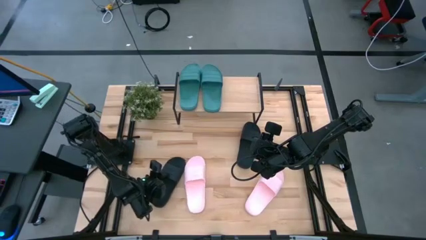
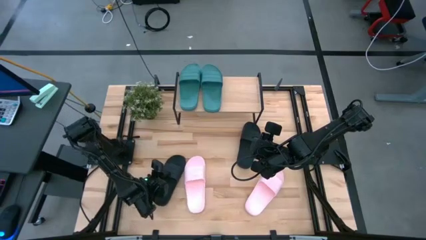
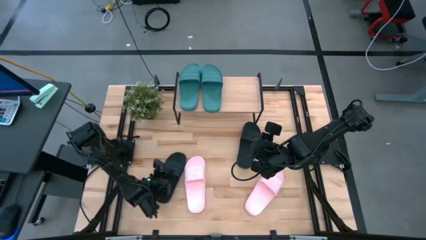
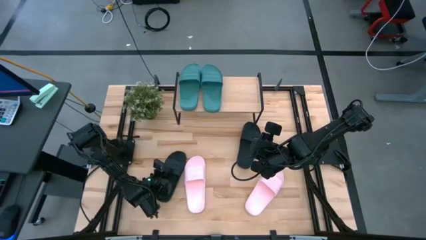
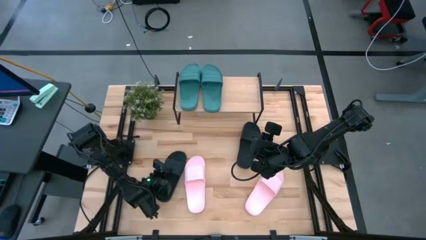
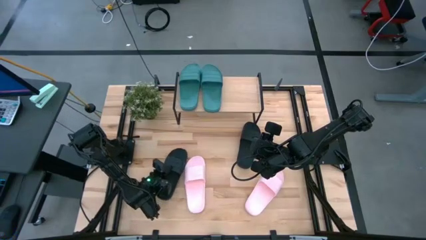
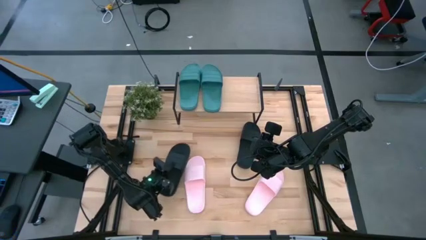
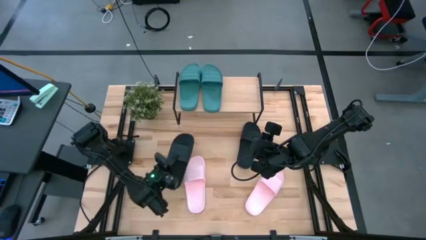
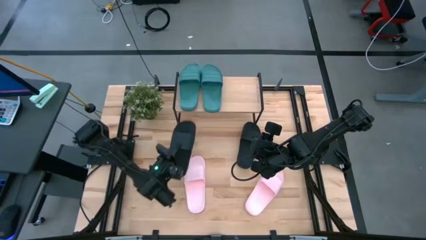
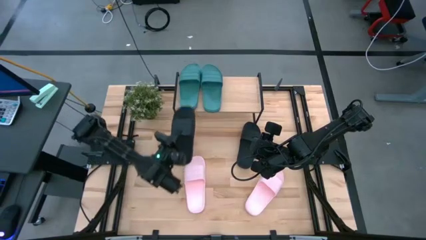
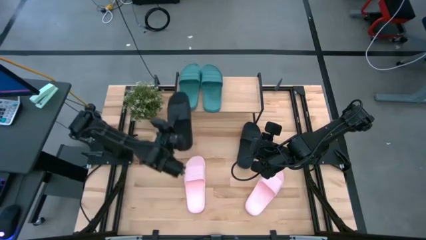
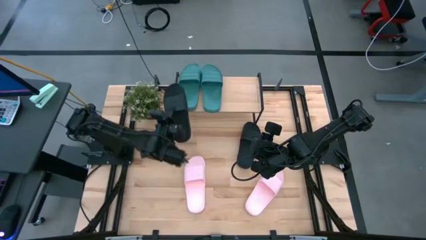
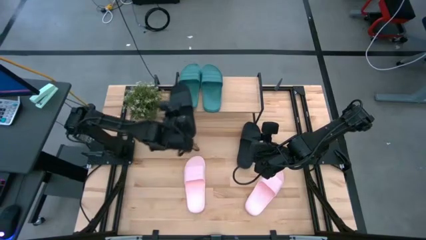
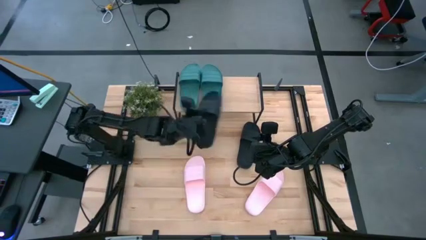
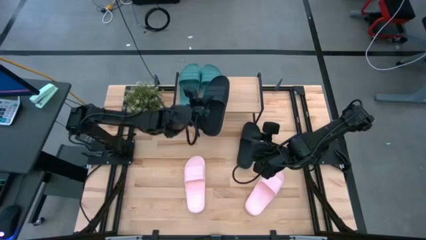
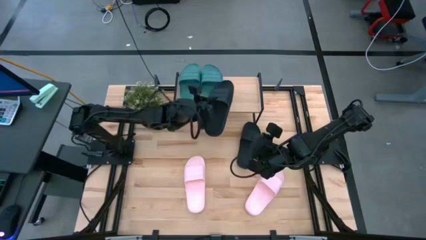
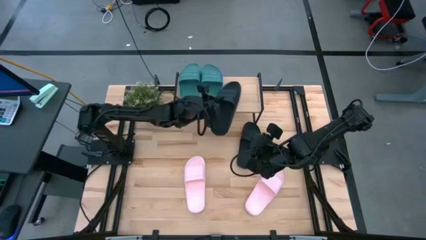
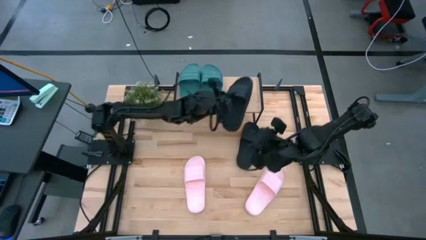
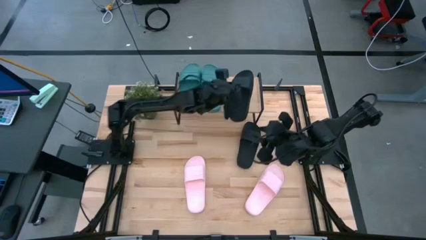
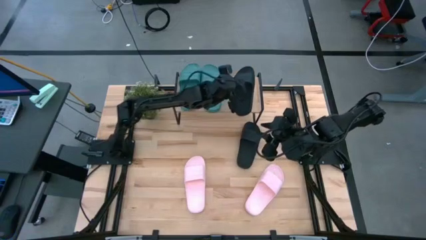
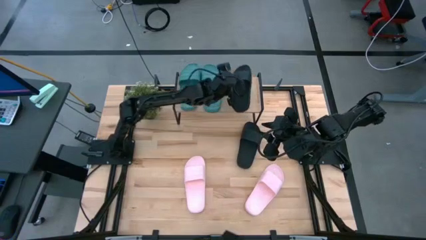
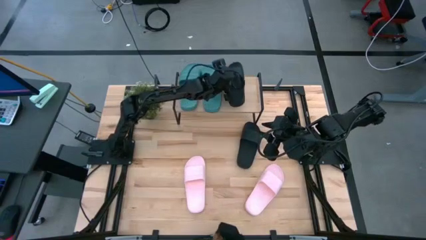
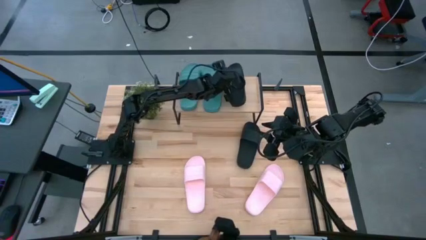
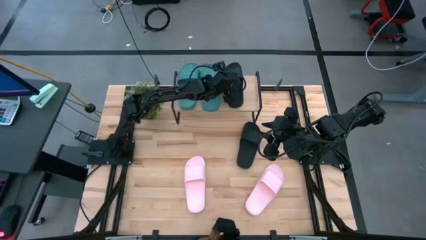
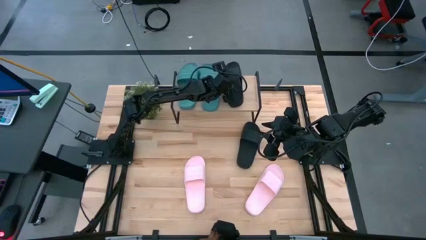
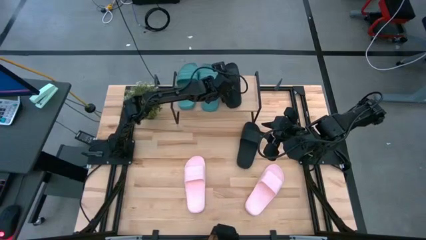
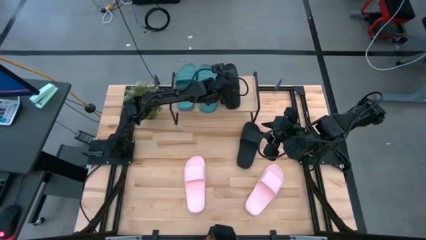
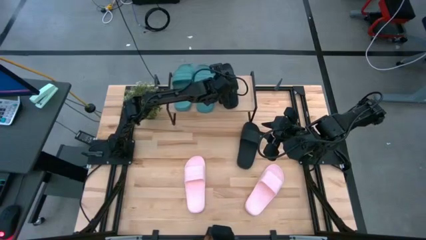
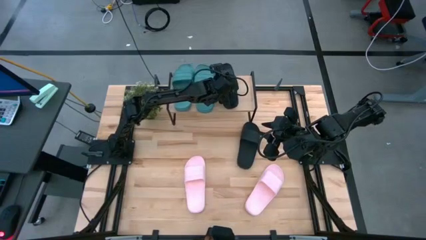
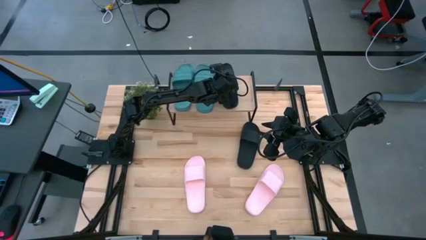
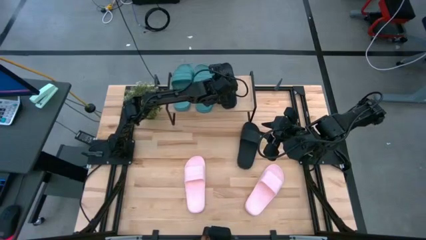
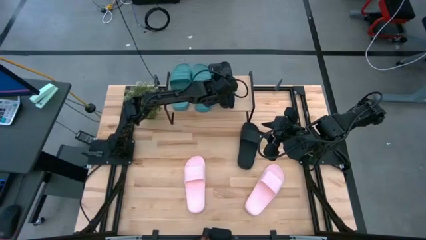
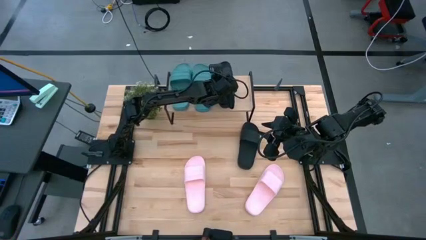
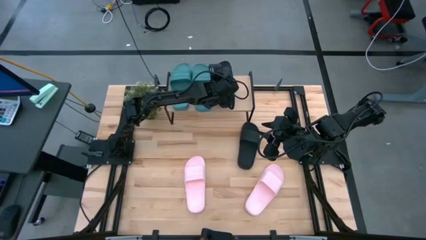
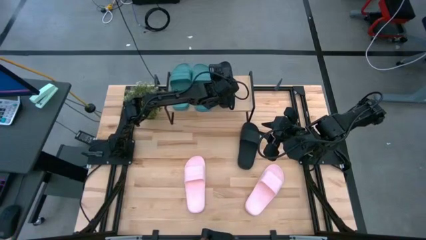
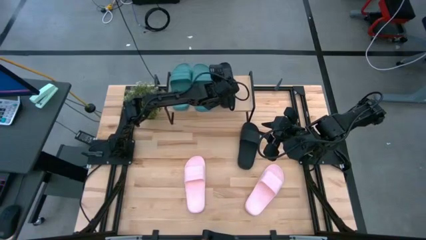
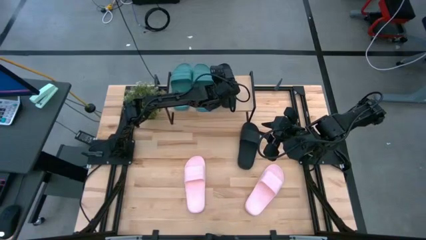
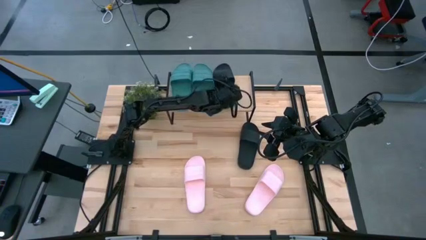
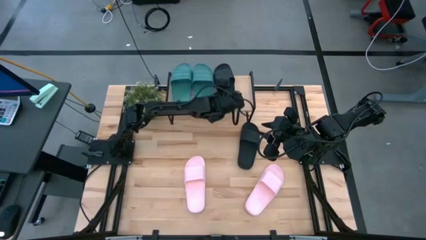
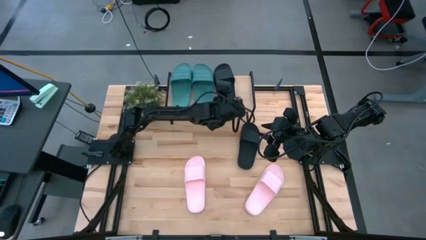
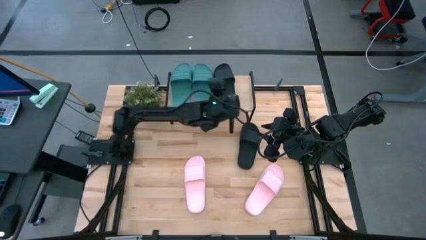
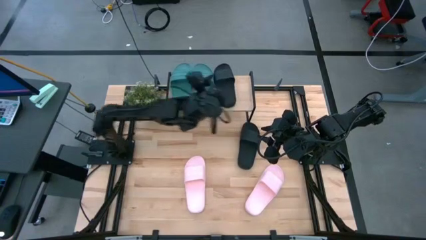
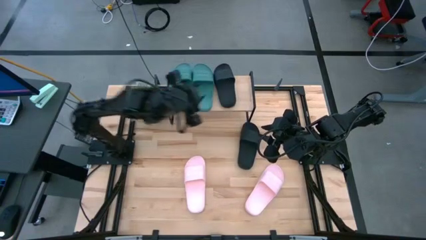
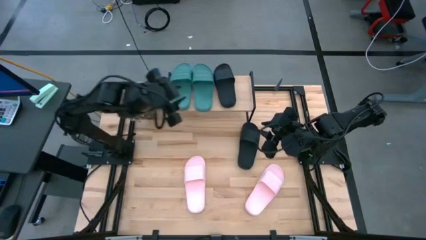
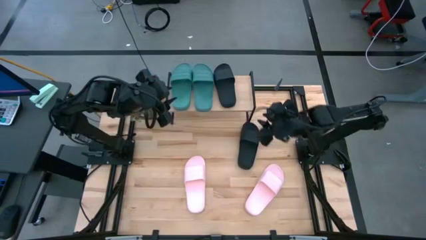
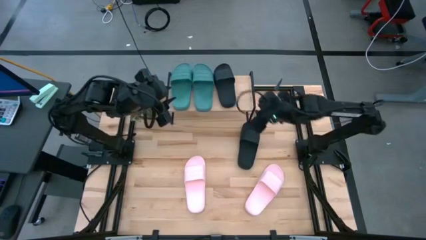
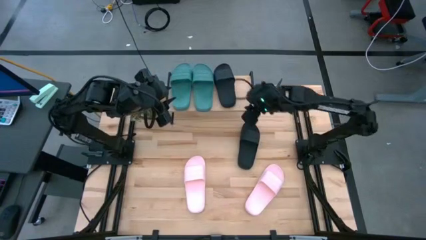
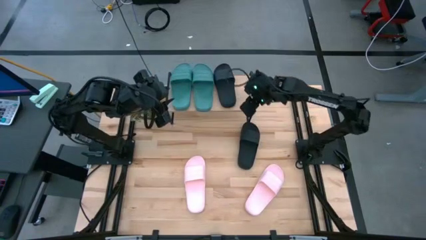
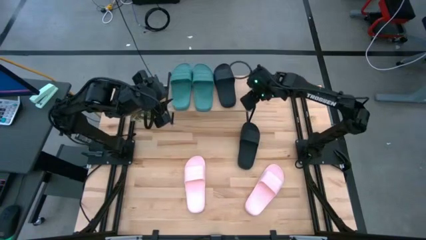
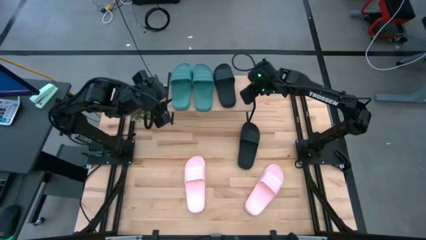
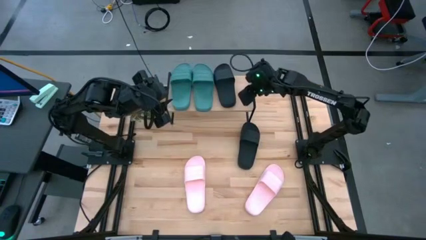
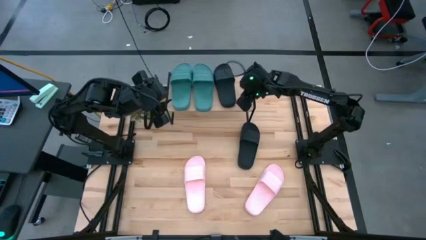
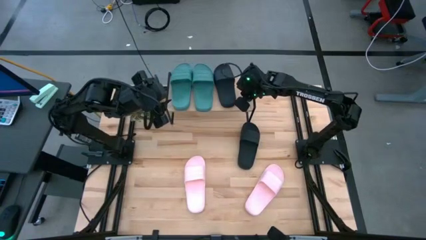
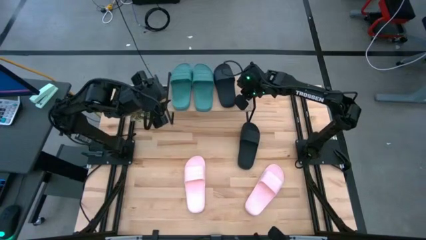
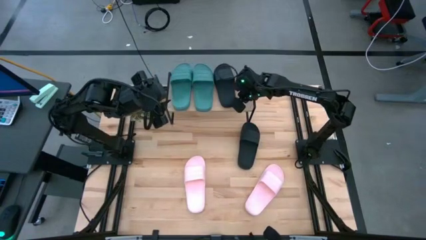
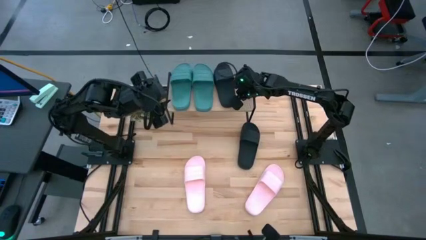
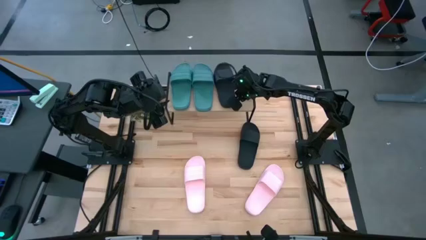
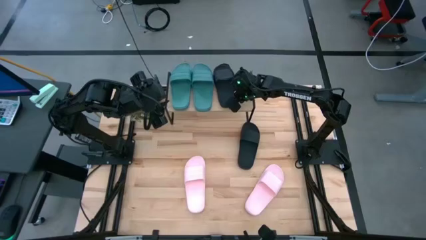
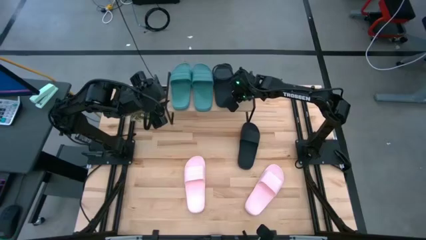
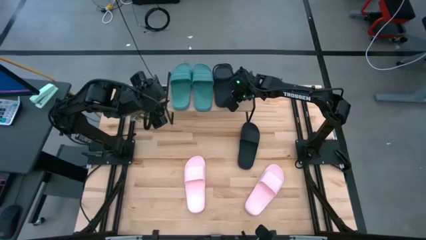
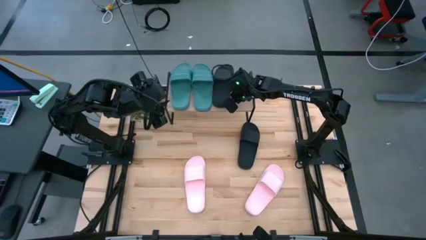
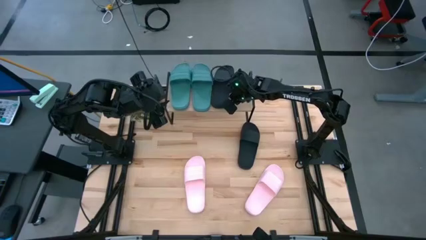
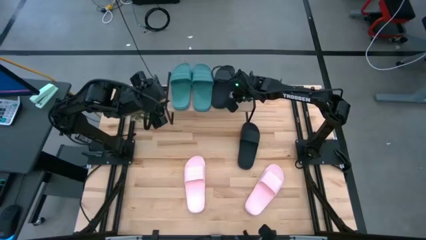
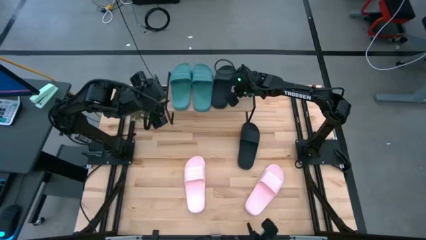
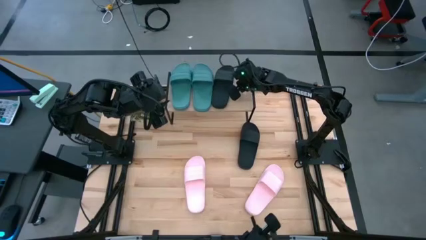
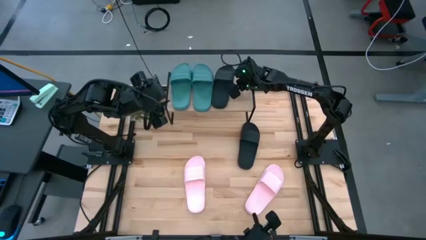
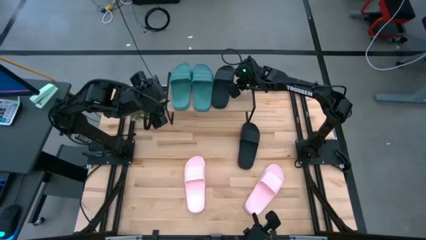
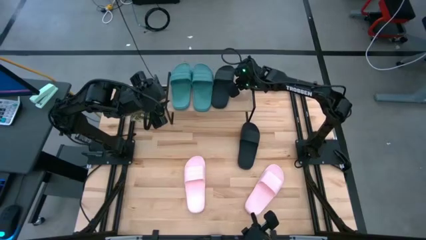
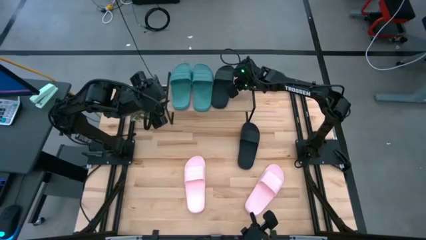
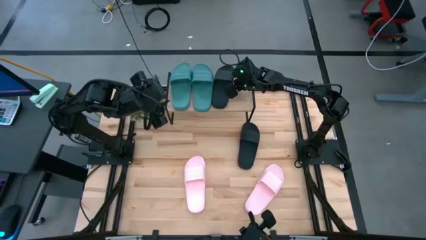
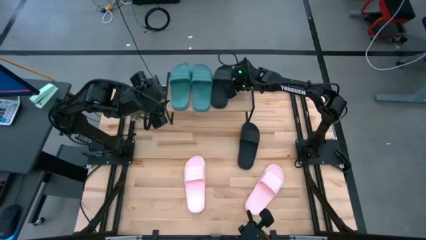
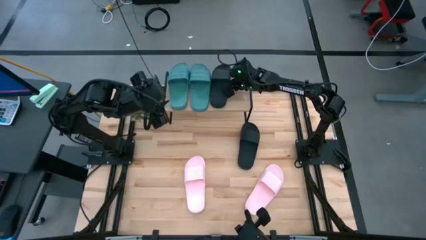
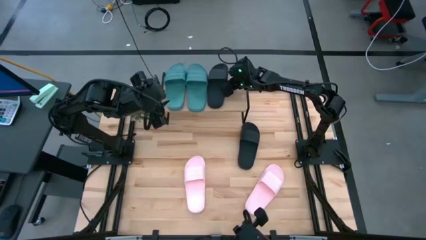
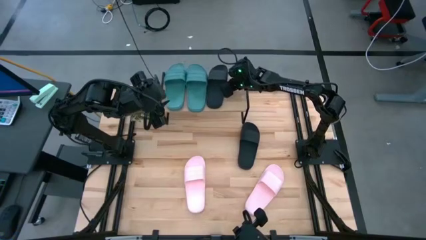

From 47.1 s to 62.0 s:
Task: Pick and place slides into the shelf
Put the bottom black slide on the shelf

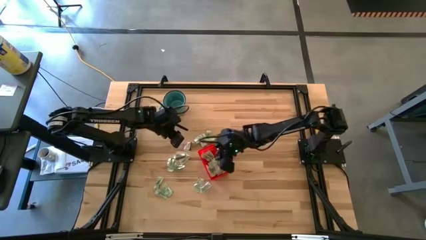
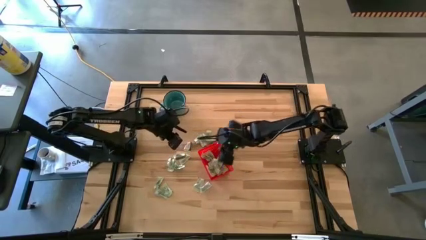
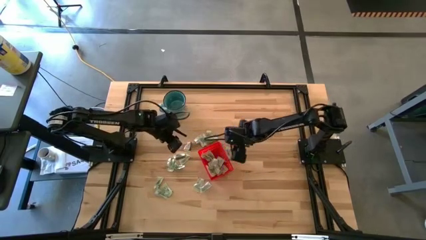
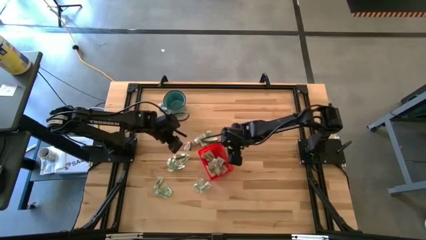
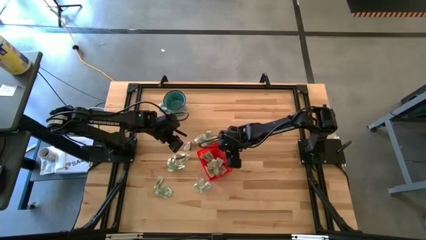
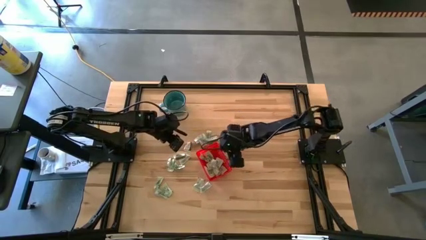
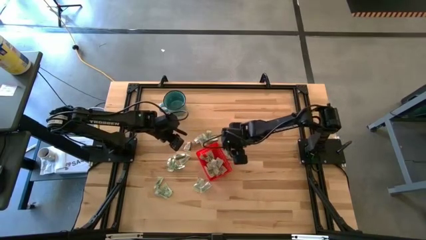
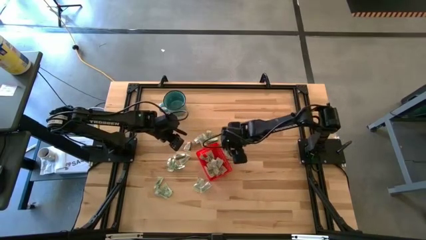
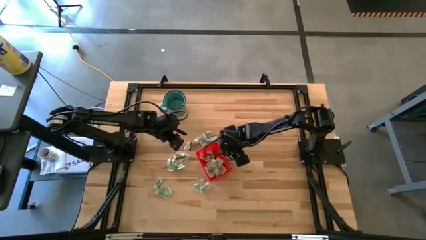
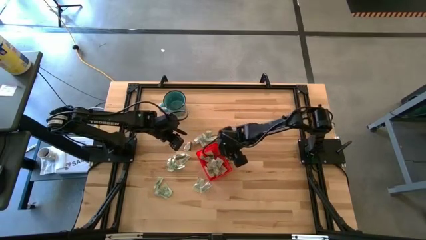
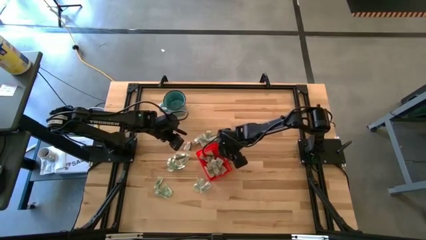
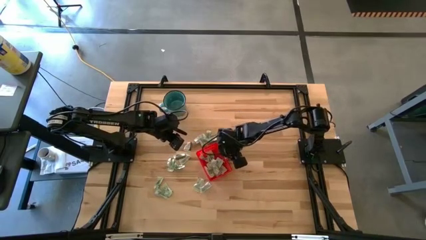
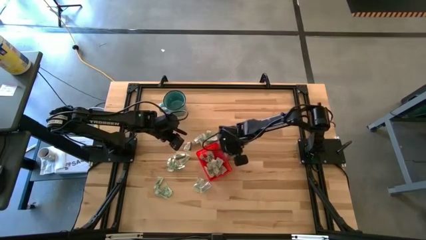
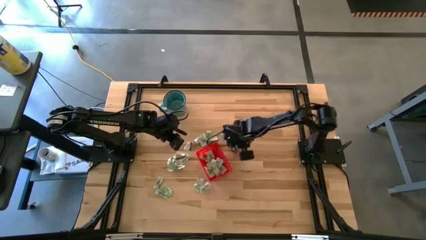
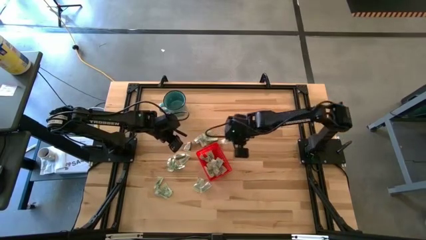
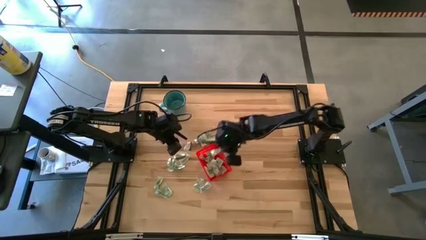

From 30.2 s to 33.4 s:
Task: Pick and place Stevia / Truvia into bins
Put the white stevia packet into the basket
